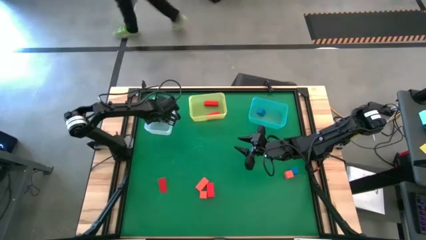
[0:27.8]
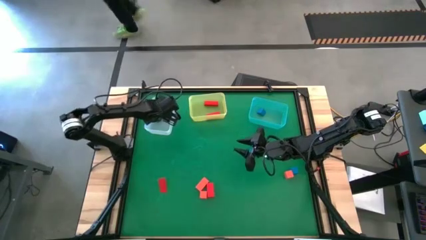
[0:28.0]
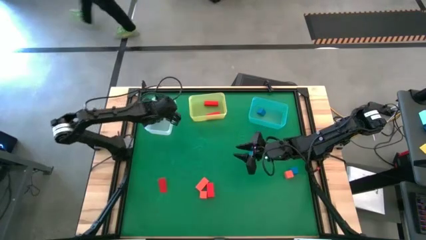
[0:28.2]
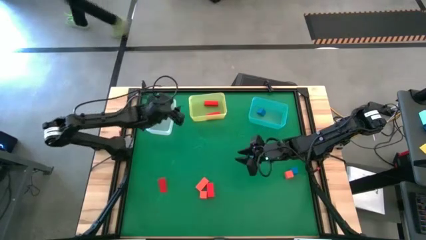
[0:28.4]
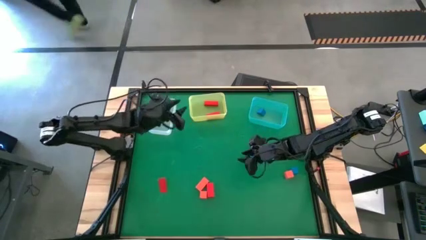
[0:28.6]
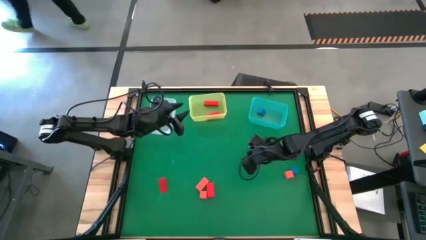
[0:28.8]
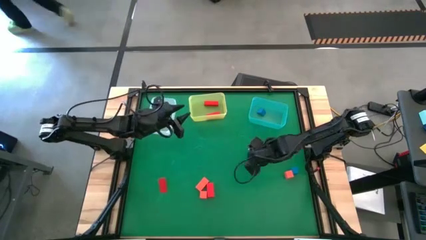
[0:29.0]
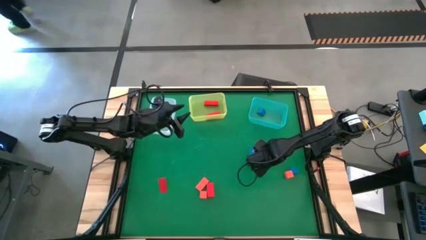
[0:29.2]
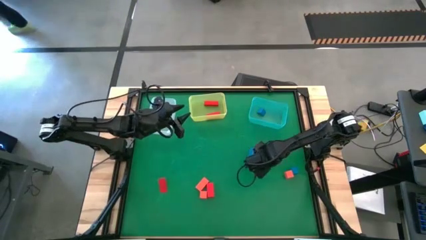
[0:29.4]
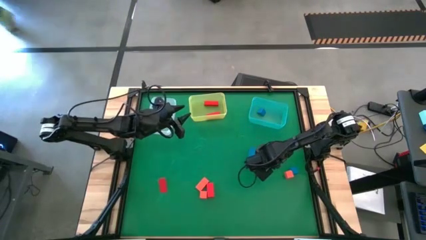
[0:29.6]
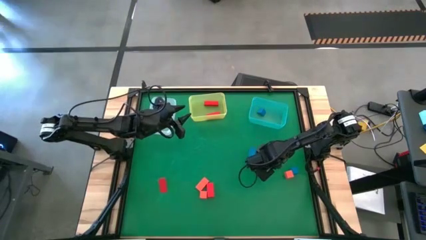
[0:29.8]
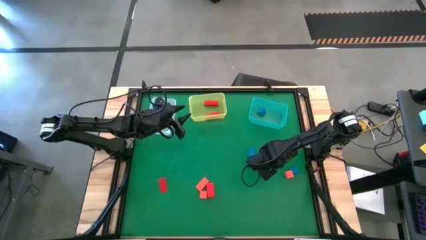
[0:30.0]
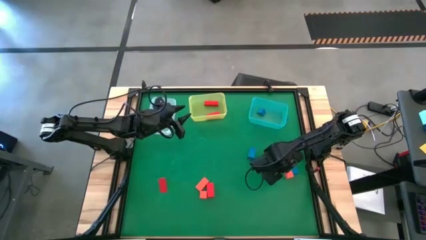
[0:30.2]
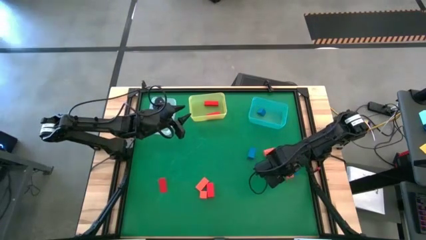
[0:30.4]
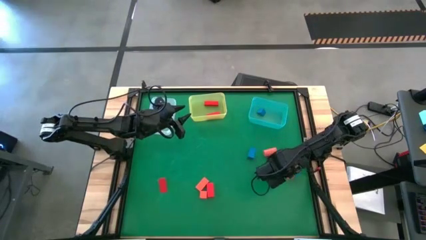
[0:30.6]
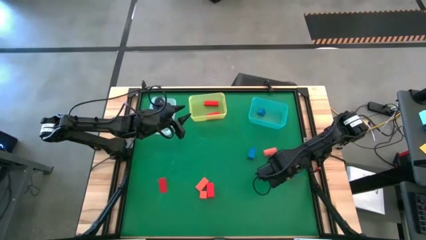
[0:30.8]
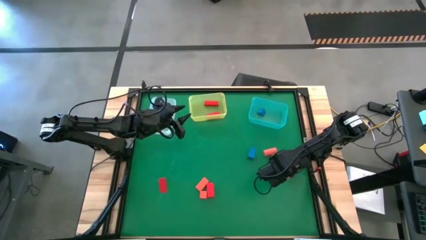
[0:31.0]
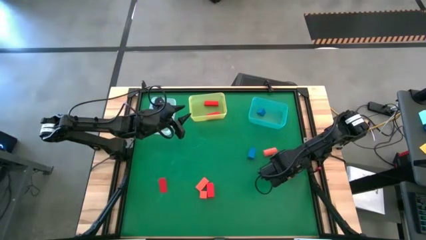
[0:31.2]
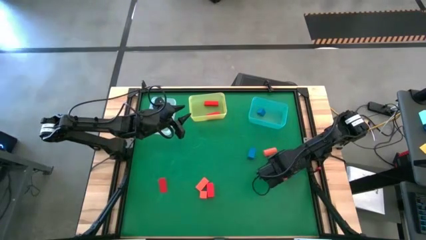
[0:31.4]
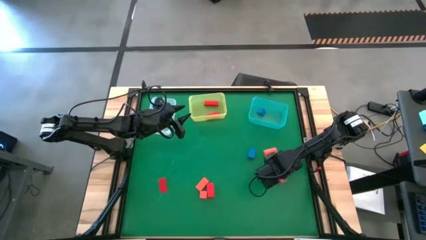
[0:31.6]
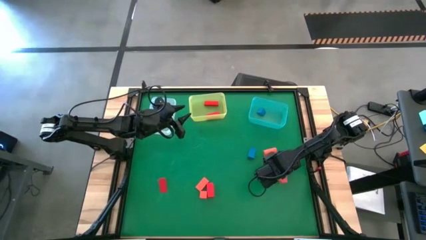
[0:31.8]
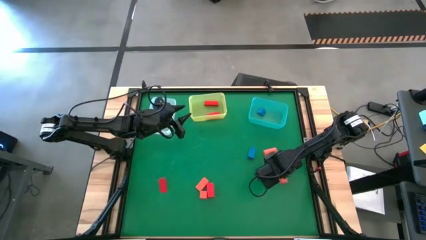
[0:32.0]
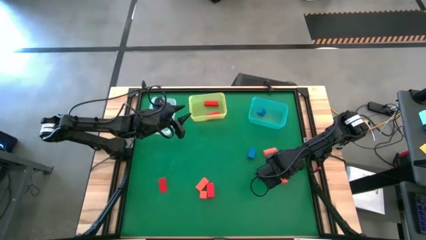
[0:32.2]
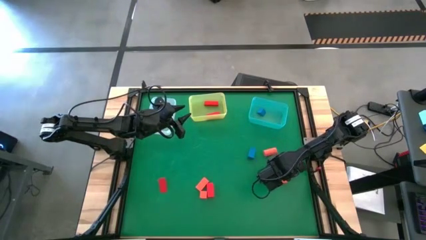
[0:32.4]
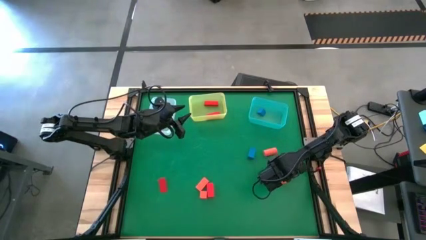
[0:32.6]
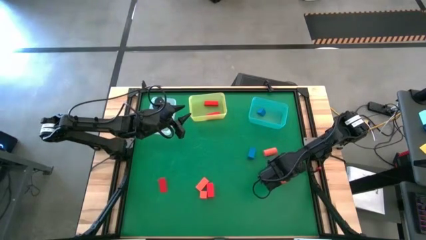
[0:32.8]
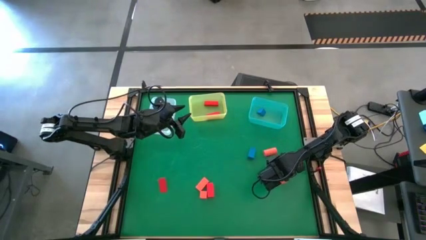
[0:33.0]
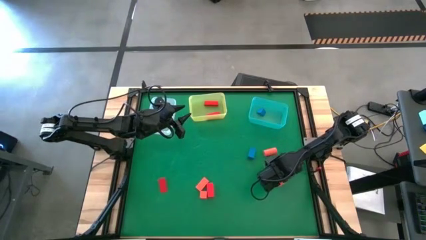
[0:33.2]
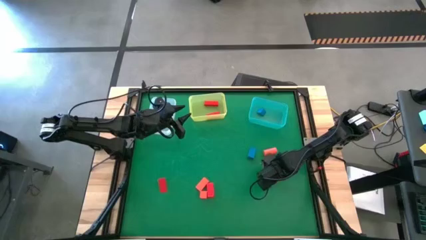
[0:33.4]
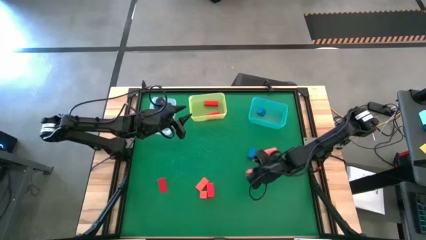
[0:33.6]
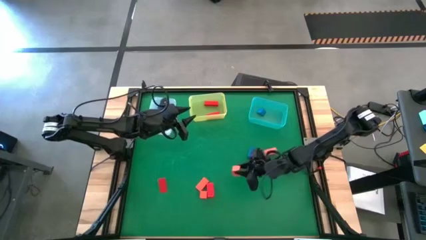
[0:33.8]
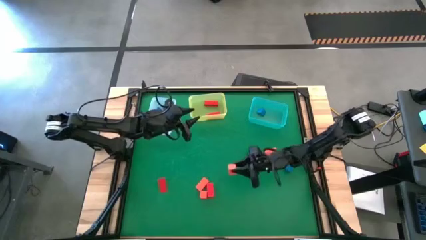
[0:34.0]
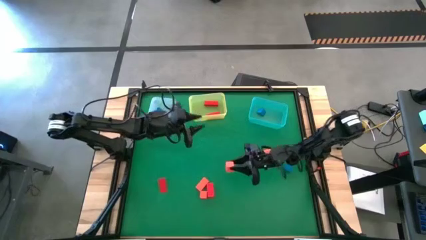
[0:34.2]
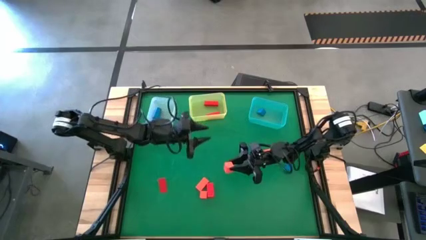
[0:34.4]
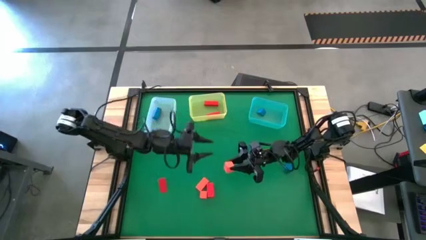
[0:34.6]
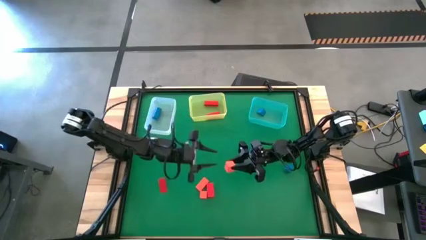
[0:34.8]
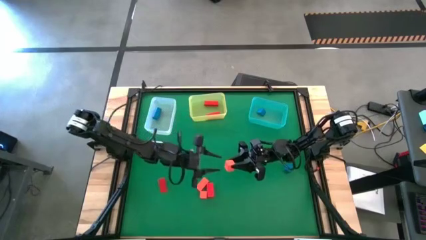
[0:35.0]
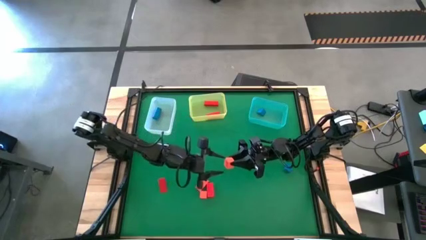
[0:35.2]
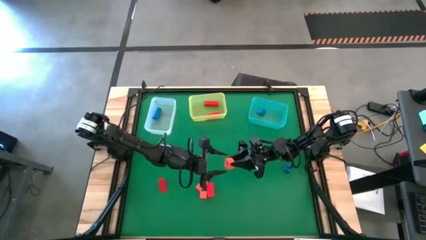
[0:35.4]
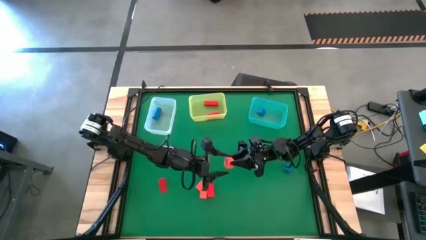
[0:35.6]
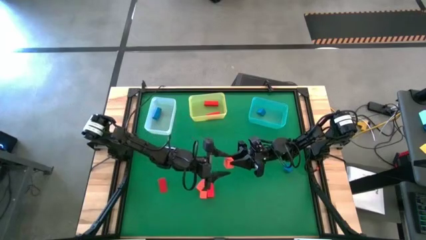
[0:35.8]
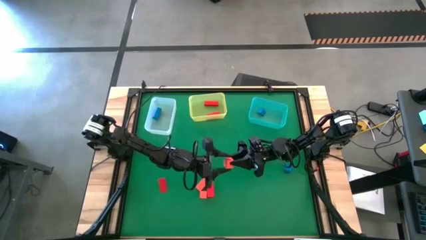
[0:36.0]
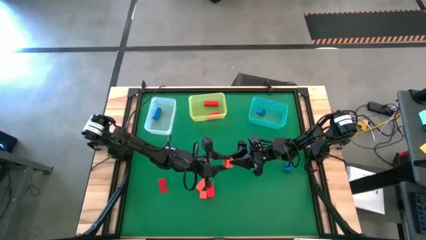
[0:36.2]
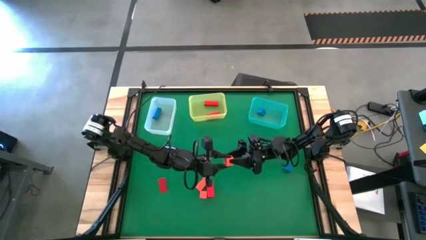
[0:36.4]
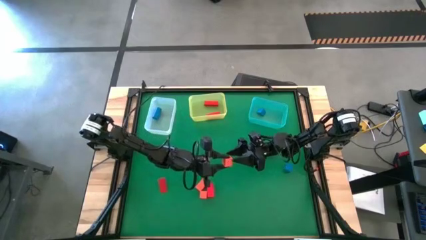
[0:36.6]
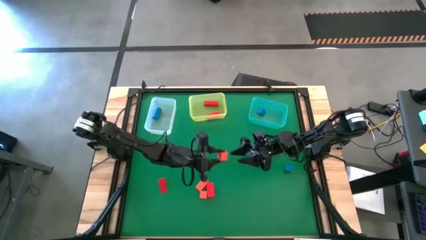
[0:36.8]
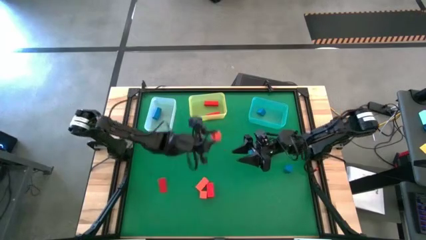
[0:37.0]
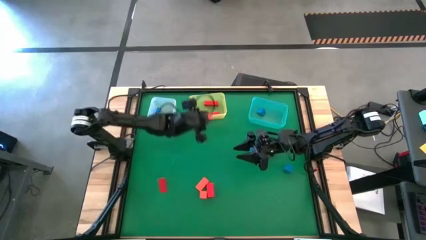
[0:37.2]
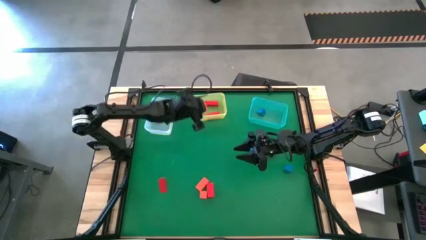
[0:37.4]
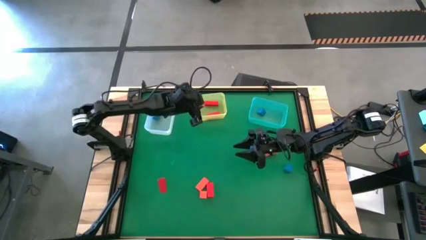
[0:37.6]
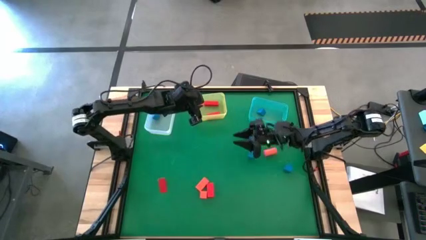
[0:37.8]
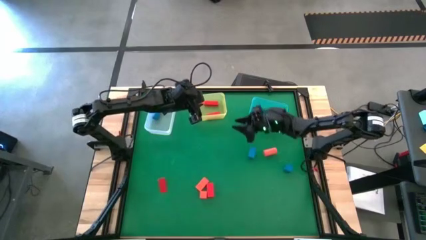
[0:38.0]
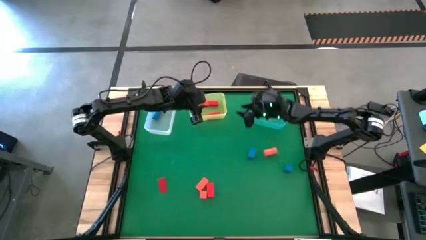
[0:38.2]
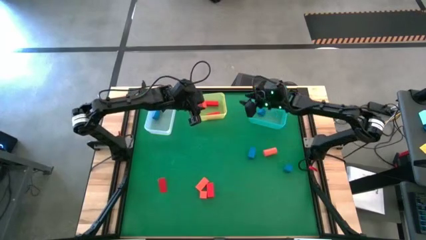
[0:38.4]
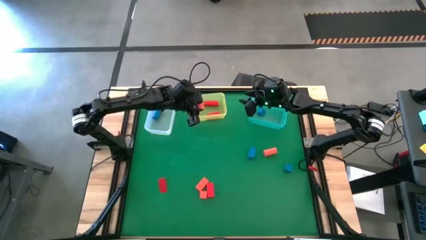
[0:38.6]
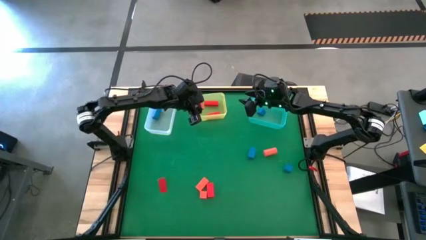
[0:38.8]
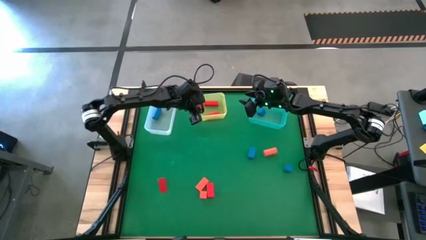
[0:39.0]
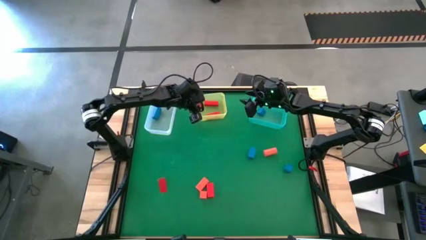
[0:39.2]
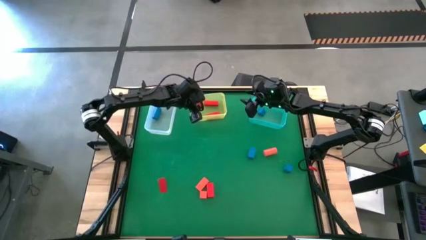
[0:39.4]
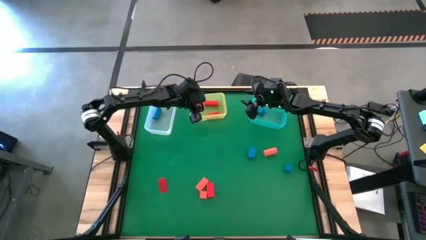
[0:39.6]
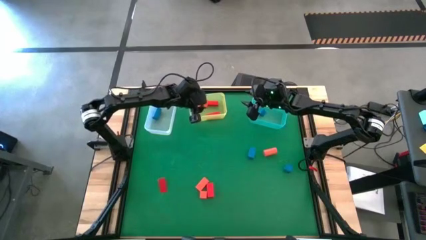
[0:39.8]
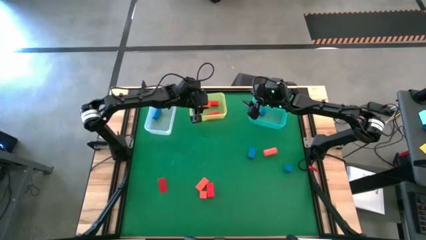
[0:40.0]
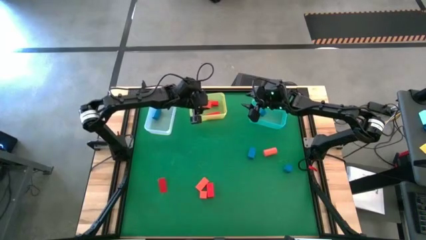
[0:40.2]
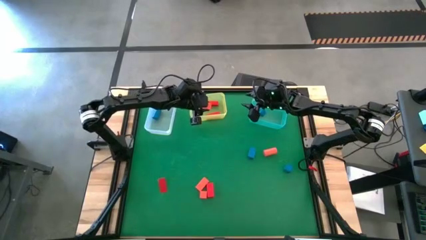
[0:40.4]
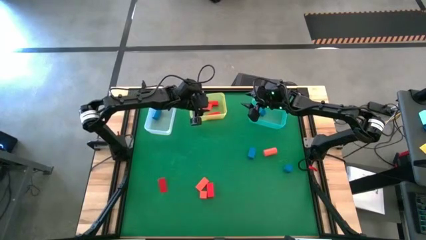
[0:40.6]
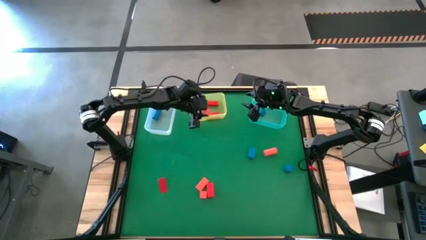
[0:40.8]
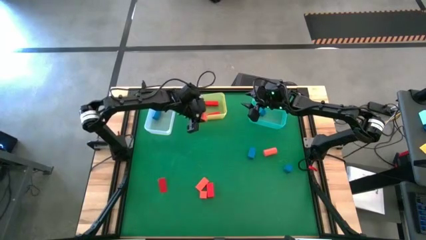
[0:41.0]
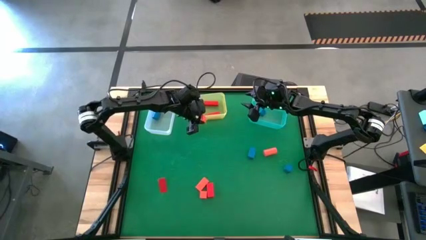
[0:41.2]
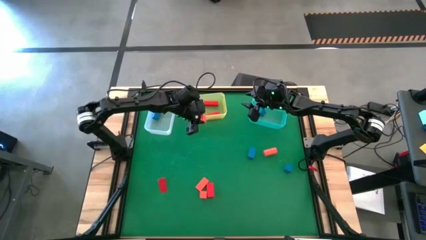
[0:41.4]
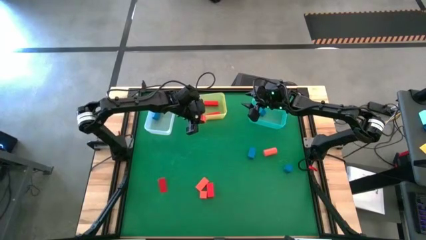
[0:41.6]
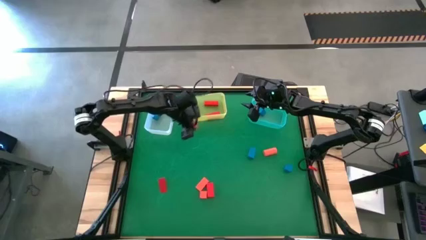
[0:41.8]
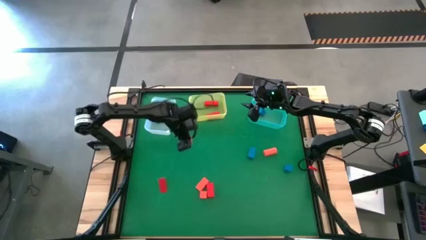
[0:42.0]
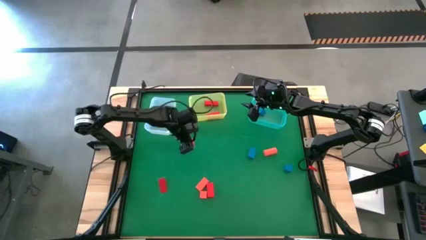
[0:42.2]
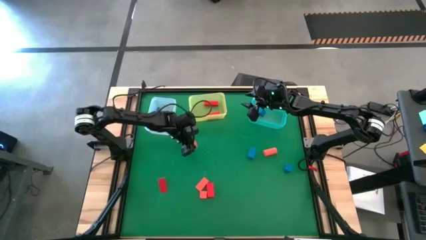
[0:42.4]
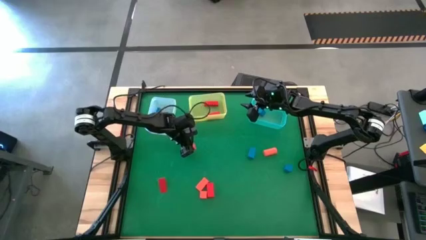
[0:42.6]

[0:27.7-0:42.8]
Task: Sort & place blocks by color
Move the orange block to the bottom of the yellow bin
